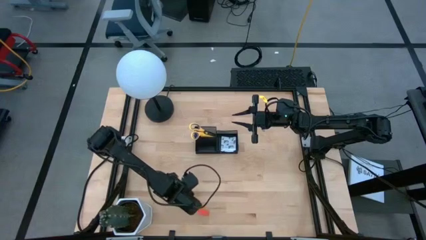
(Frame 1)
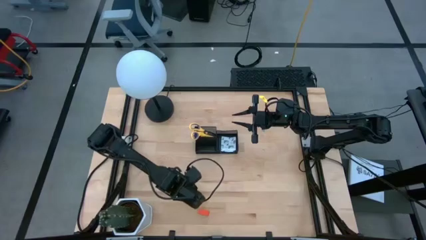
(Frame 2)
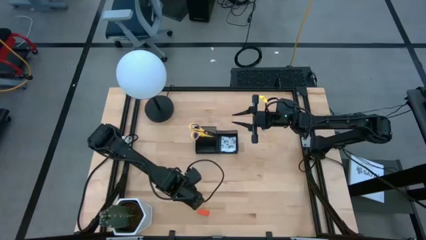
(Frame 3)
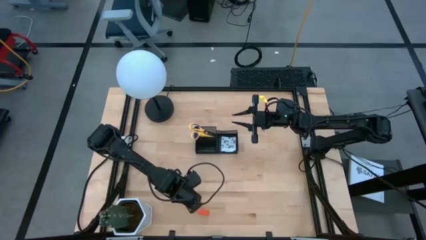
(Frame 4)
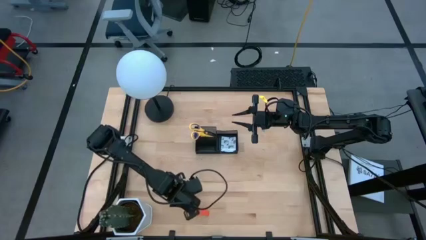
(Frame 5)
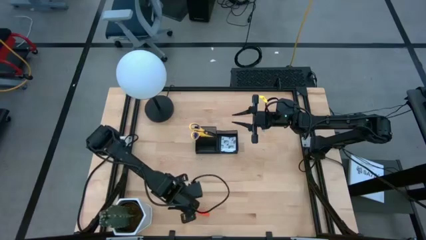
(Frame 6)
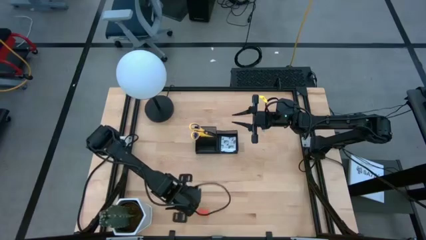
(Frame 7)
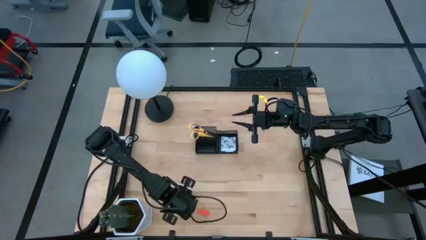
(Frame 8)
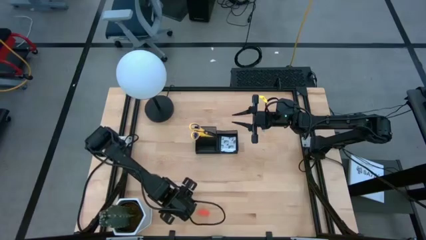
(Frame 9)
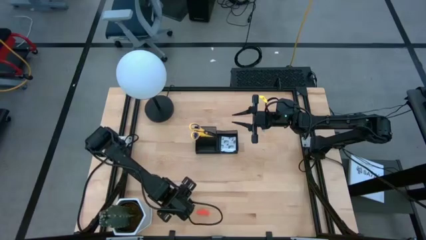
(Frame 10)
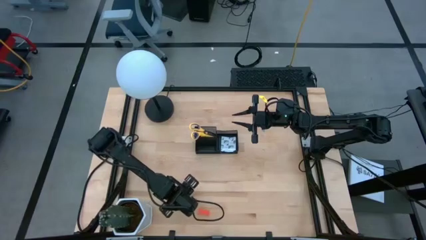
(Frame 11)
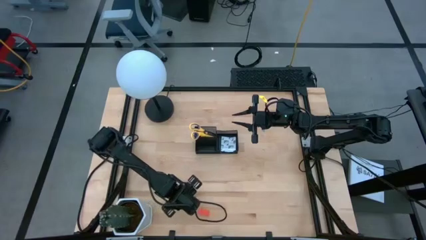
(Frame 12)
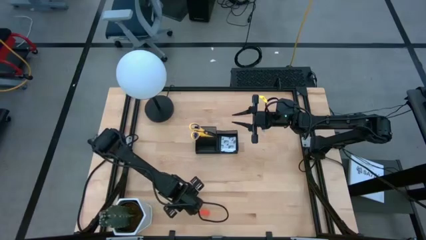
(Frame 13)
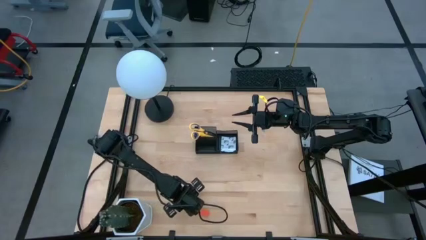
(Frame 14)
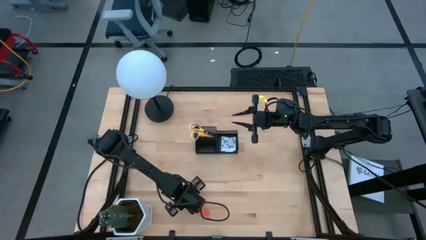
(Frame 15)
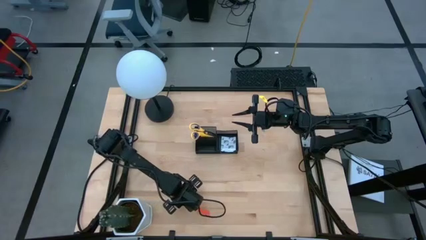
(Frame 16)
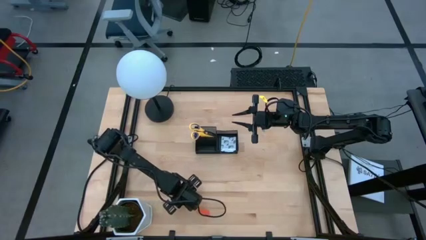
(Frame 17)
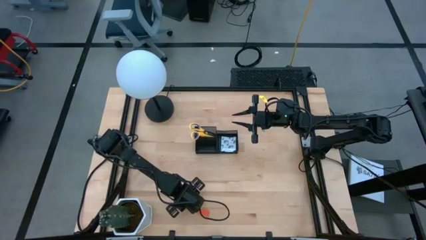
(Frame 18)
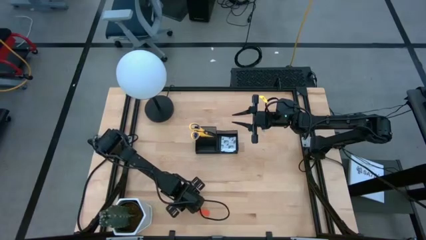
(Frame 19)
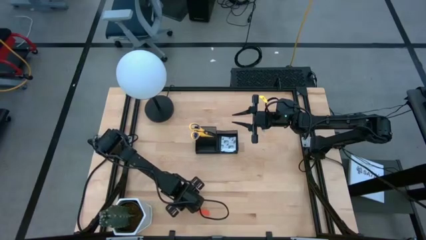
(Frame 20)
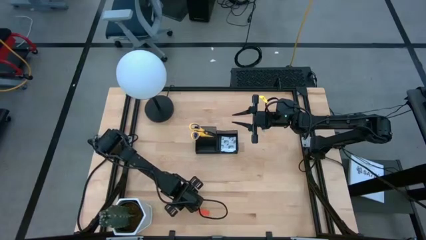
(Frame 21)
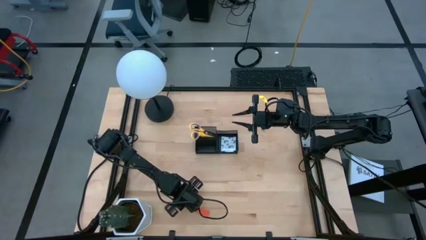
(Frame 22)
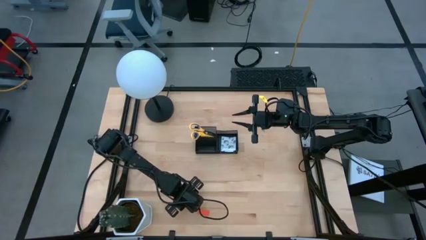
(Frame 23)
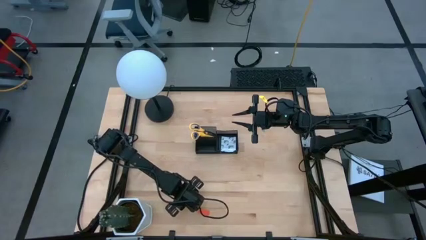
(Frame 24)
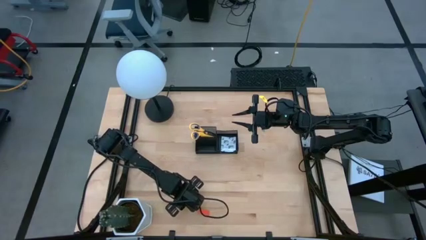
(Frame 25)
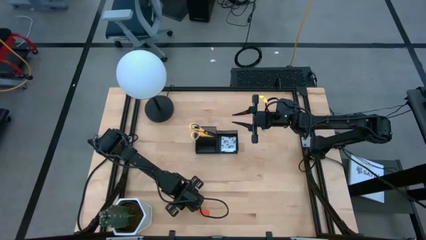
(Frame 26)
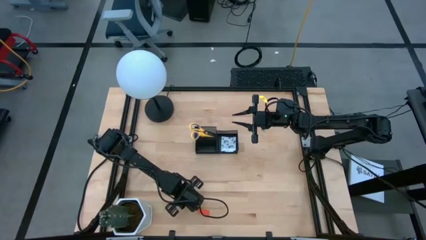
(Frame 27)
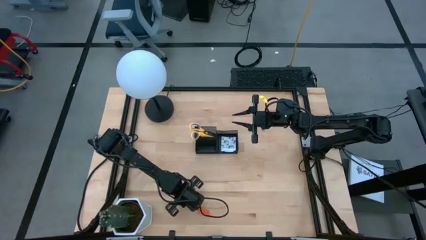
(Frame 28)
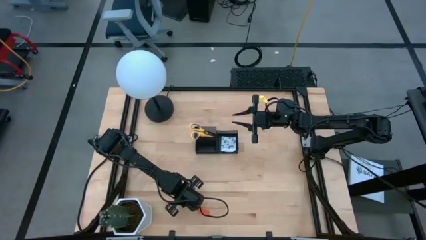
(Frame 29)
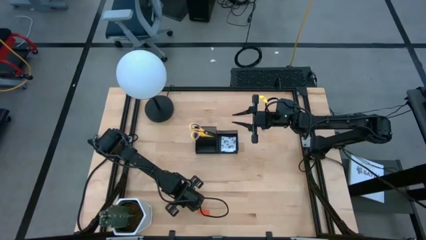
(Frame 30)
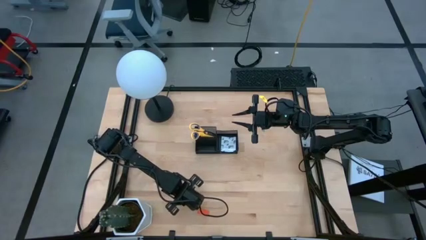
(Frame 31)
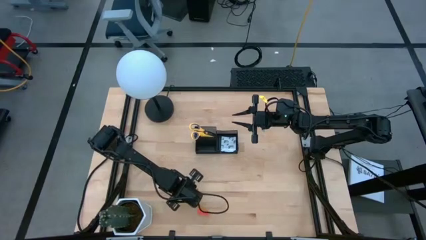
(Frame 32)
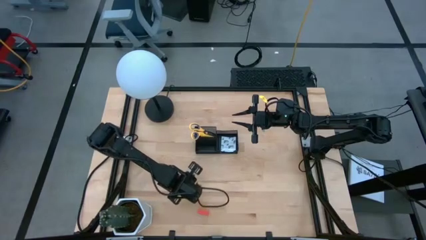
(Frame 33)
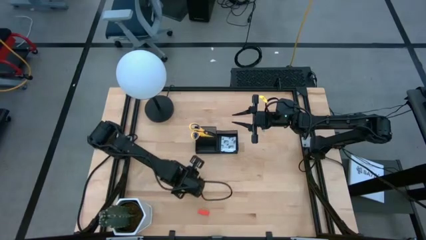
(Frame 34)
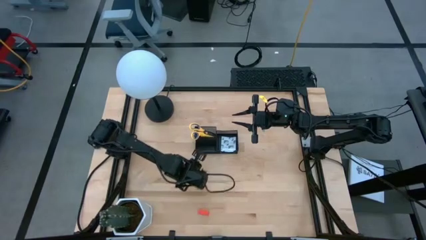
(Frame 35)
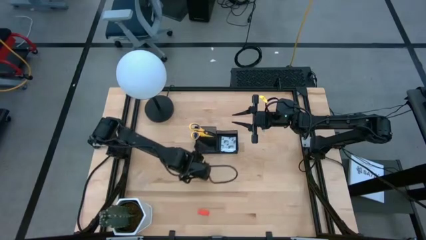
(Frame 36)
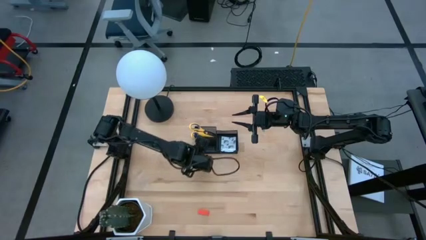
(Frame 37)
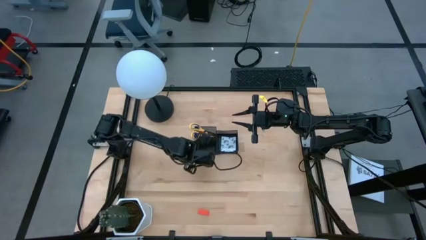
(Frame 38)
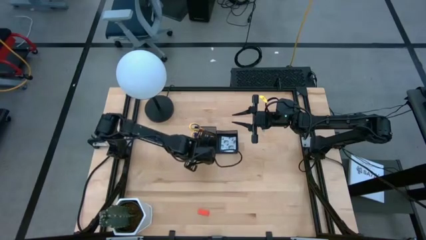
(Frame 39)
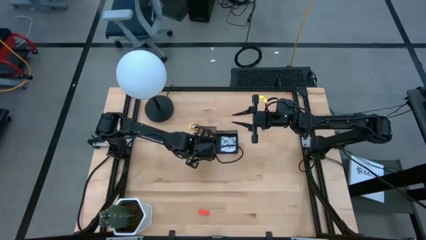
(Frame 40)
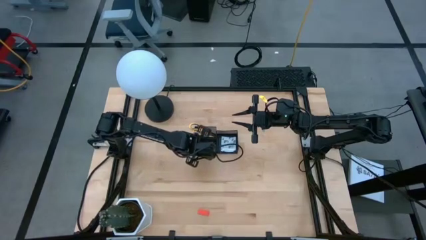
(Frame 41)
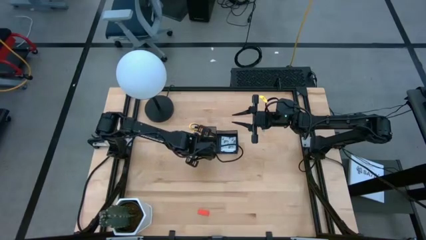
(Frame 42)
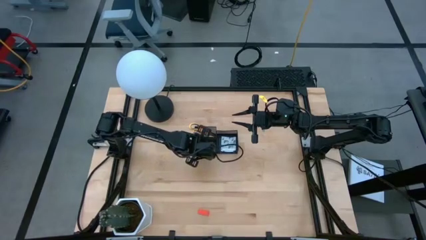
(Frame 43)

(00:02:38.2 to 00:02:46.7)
Task: Pick and place office supplies into organizer
Put the blue binder clip into the desk organizer

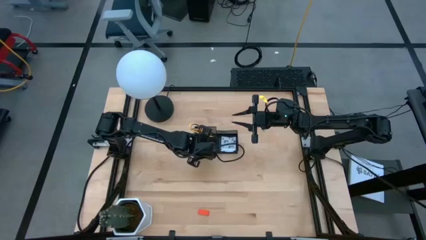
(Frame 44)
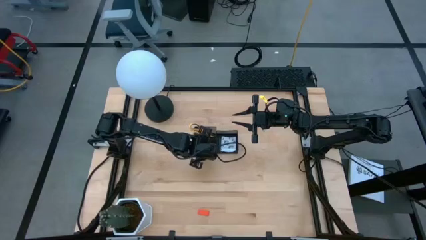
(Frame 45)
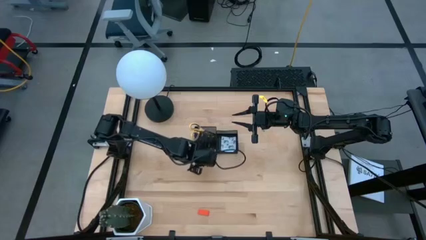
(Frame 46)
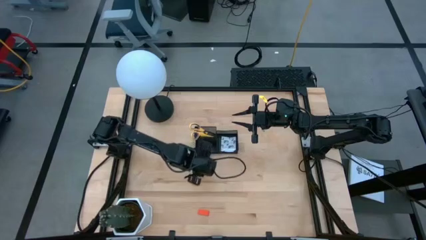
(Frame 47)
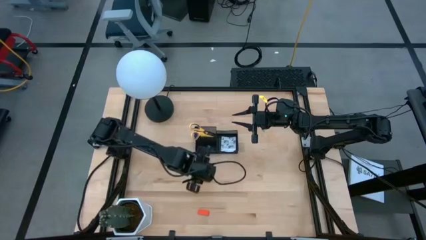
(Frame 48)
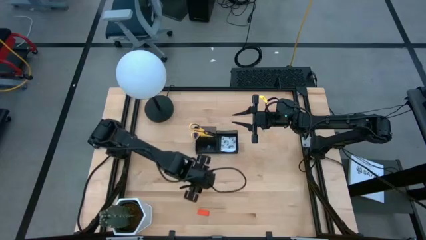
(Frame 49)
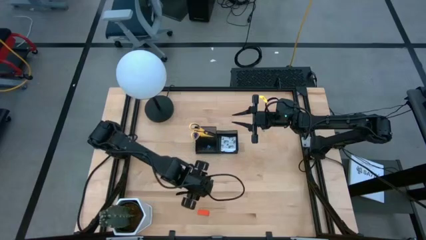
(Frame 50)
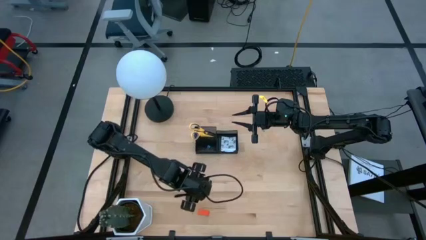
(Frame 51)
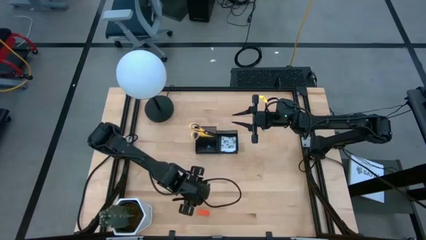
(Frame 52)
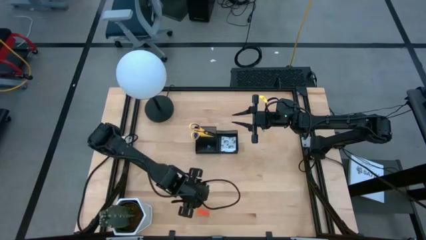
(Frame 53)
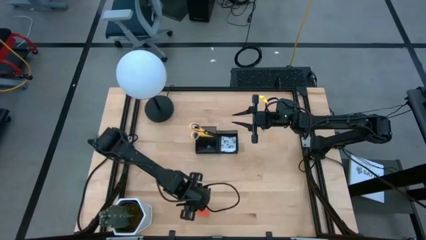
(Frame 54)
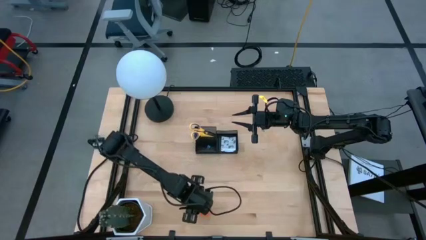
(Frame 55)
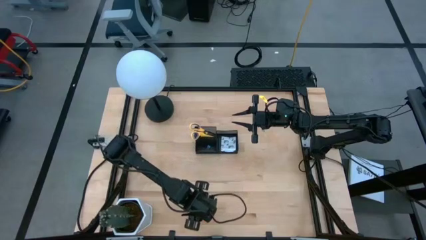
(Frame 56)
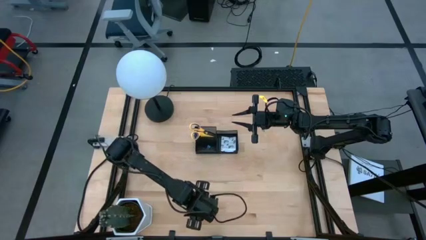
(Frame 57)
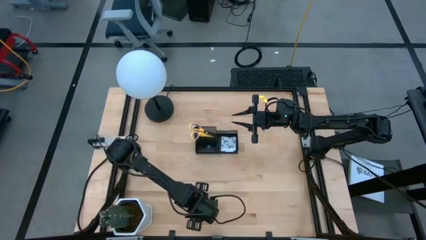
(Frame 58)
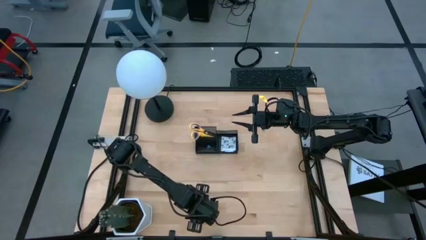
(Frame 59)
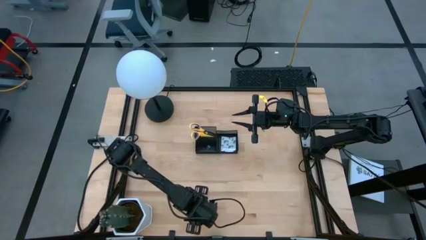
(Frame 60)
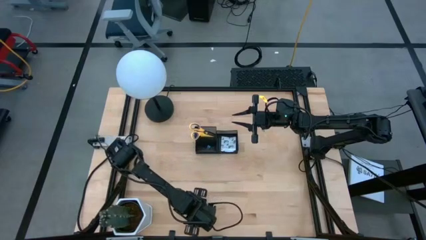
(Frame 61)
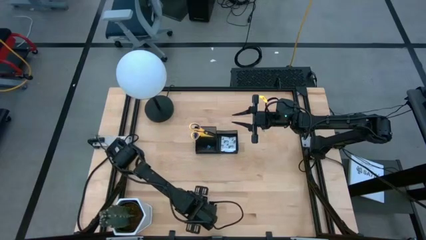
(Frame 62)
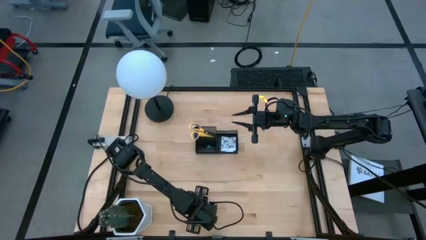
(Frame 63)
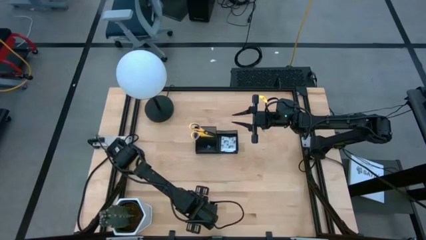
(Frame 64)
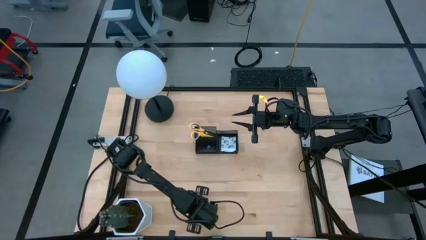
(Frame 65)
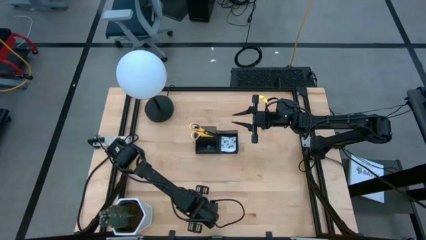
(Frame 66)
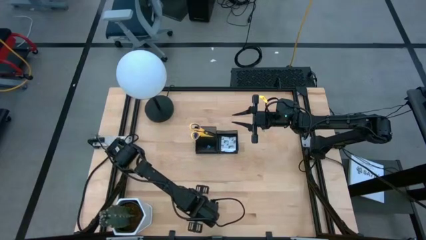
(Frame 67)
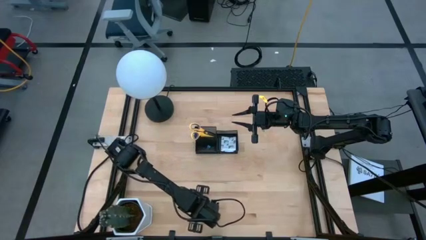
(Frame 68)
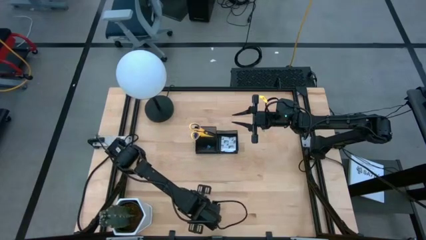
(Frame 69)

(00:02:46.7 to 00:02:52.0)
Put the orange eraser into the desk organizer

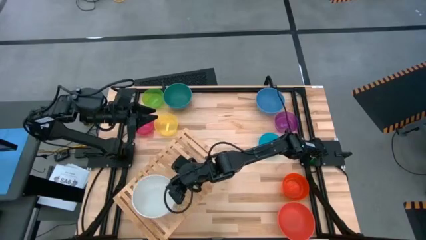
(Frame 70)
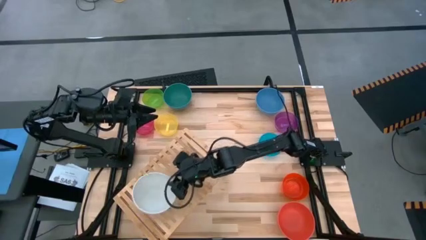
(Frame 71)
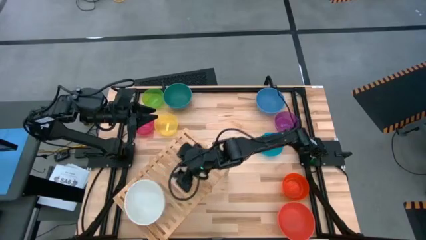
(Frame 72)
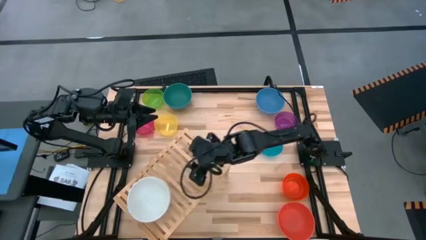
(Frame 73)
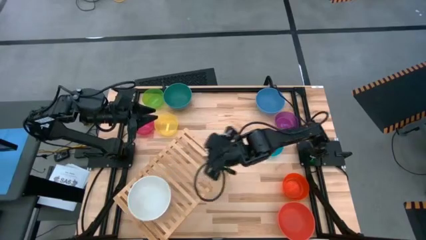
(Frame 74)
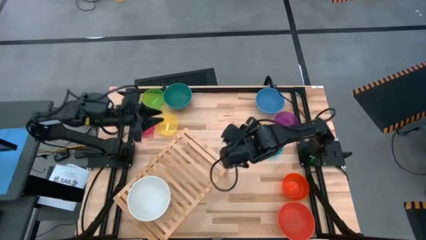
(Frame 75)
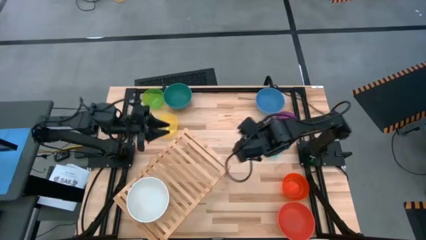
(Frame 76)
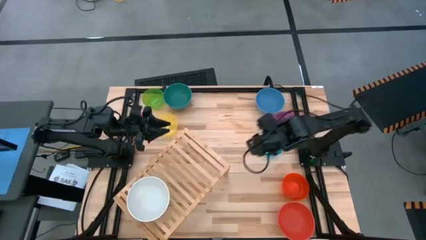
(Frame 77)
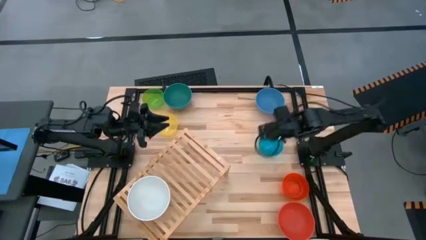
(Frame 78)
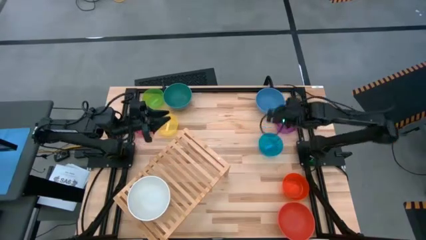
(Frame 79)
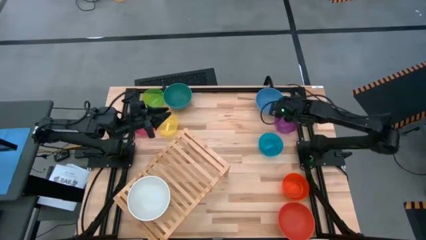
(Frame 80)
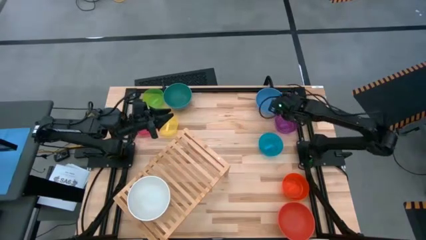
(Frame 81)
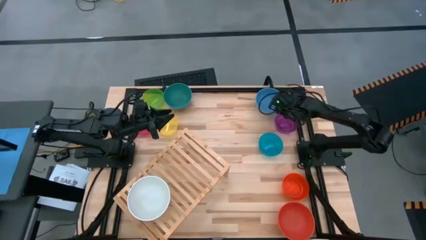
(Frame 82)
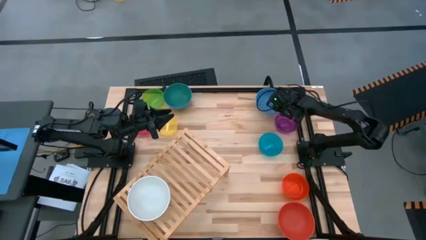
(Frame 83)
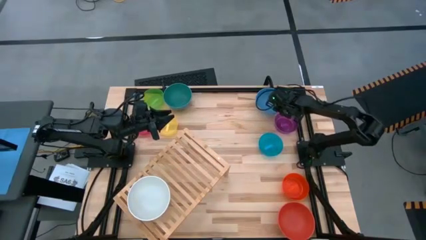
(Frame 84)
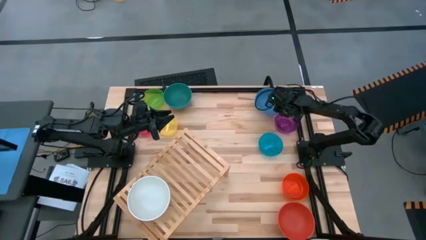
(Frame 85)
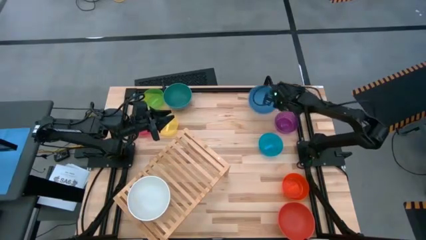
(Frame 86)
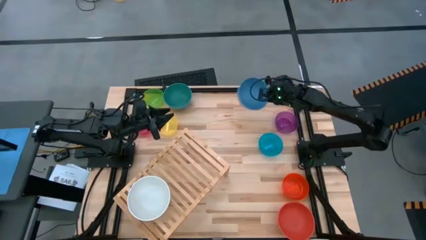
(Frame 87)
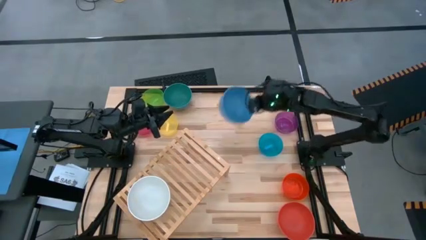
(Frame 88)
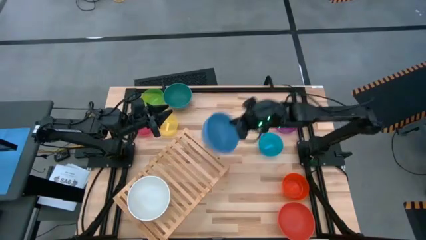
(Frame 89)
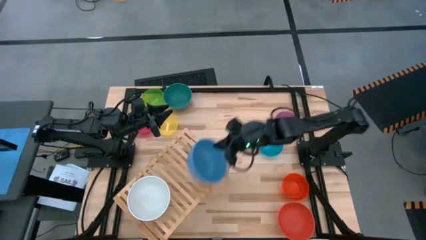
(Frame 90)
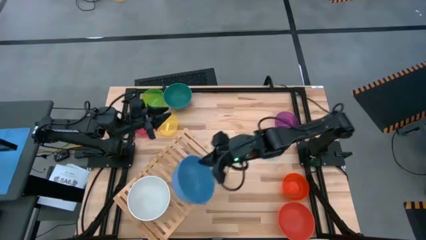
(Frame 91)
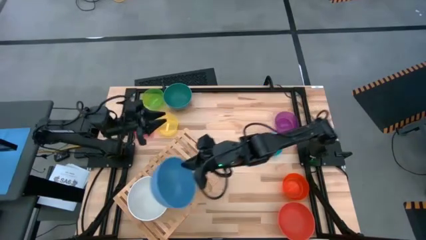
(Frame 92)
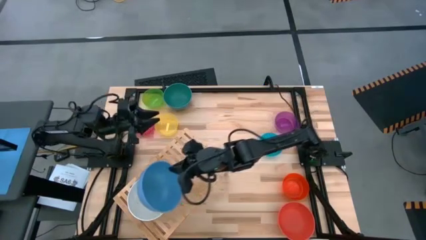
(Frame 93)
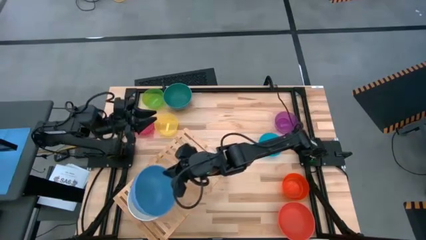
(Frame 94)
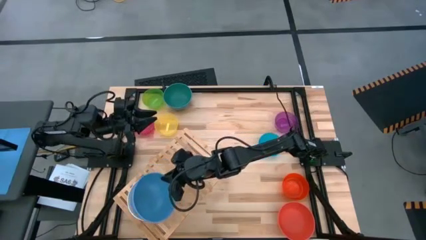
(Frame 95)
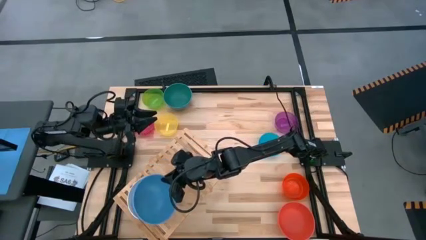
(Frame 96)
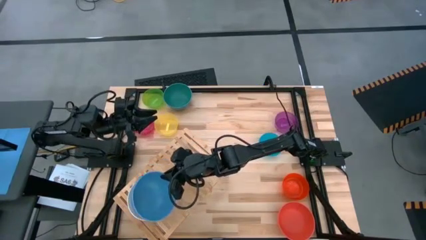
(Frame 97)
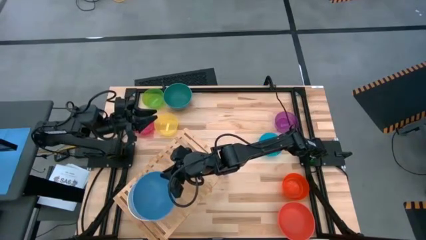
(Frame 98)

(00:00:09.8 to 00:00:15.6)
Task: Place and stack bowls onto a shelf
Stack the large blue bowl on the shelf on top of the large gray bowl on the shelf
